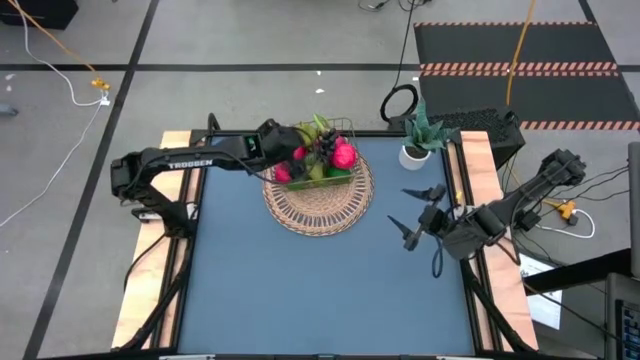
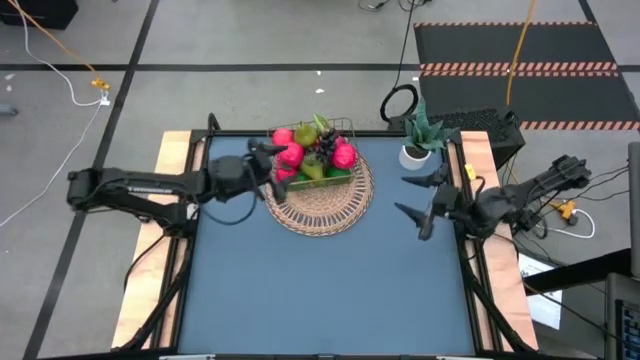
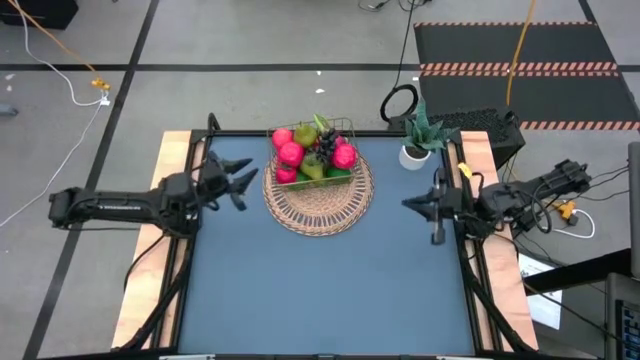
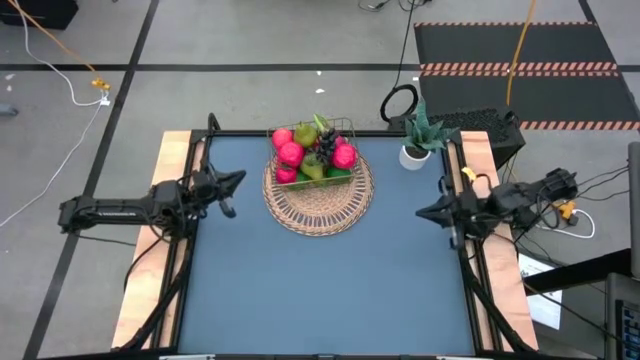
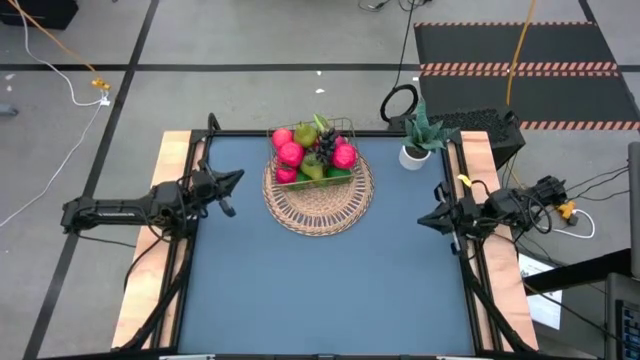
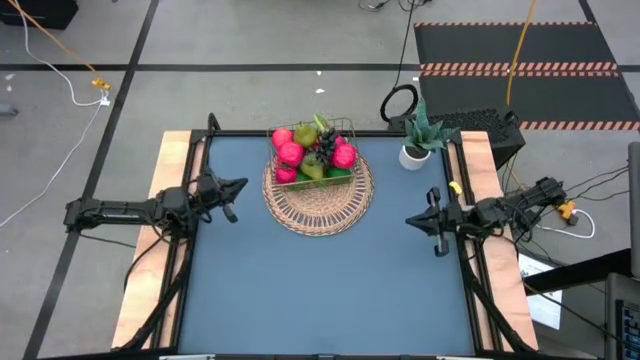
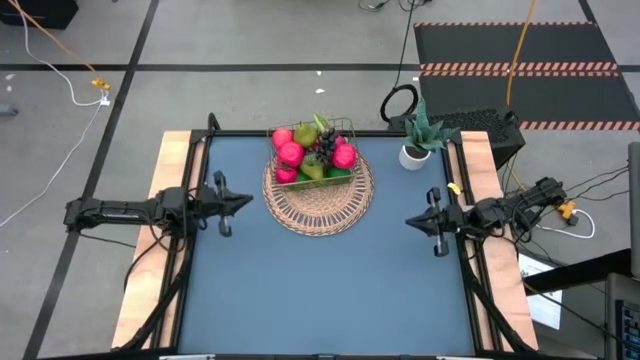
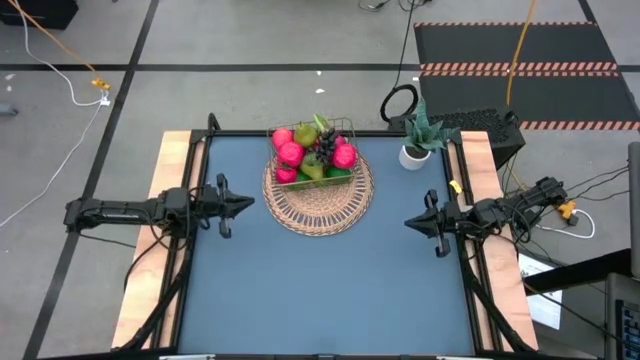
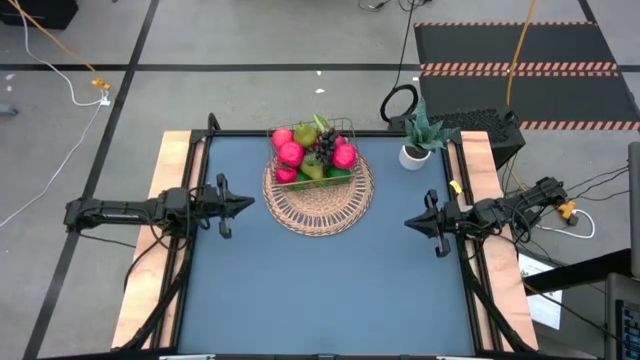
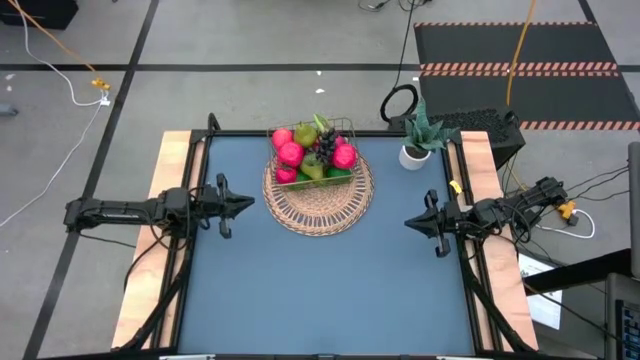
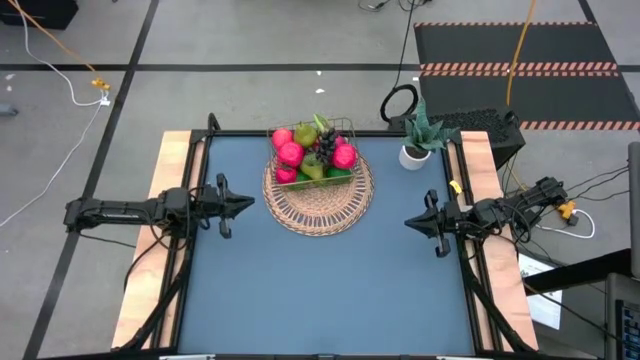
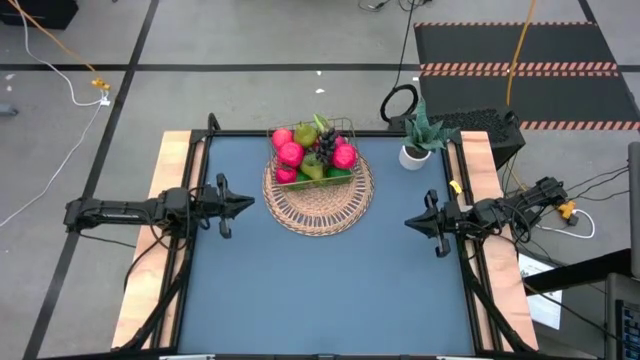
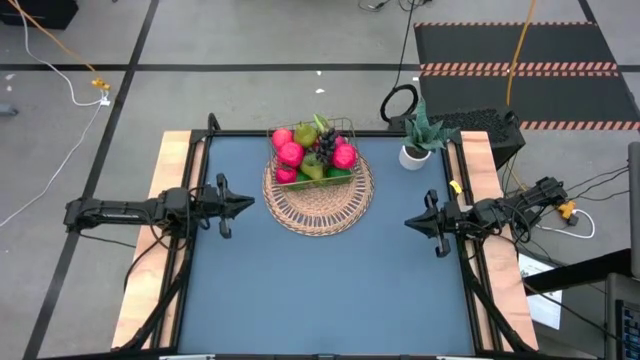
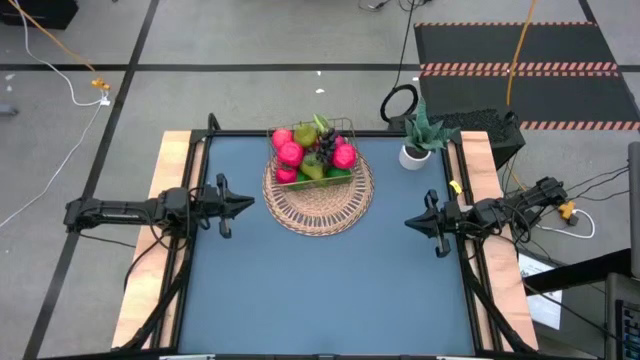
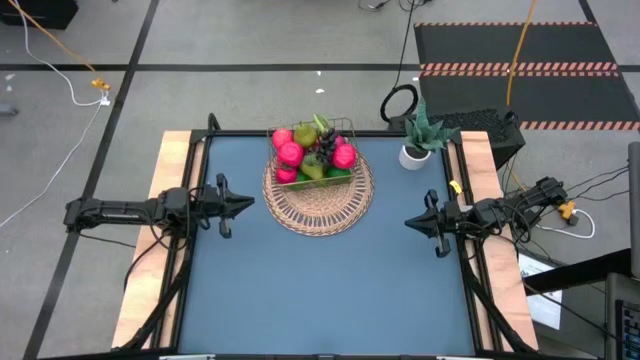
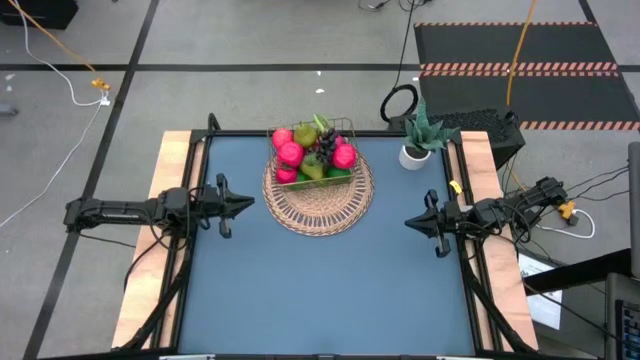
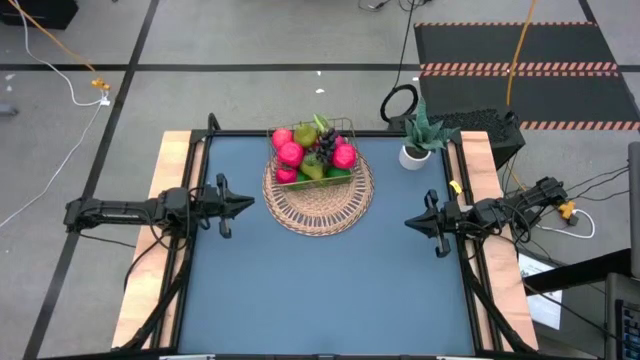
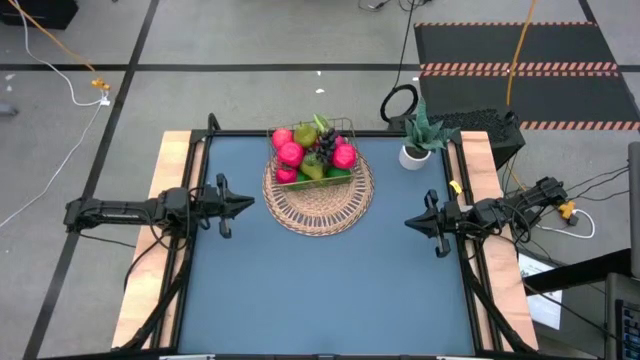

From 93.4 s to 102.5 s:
Task: Build produce basket
Return to Home Position

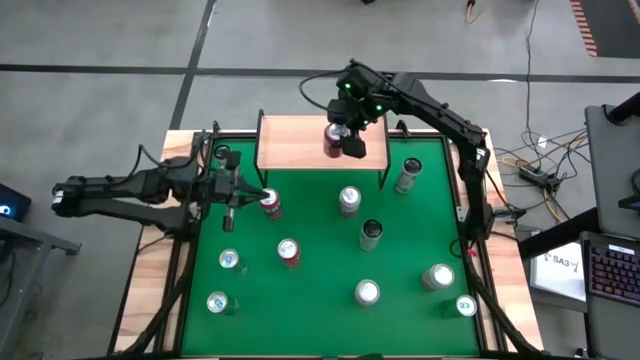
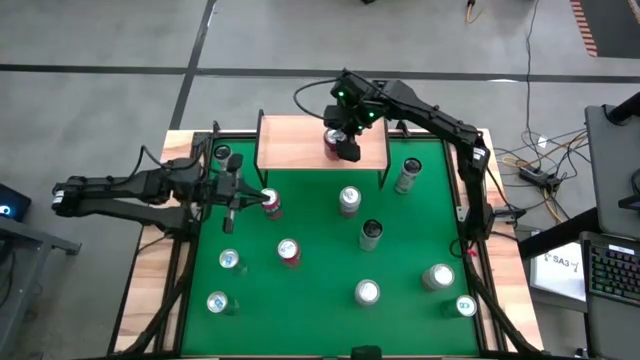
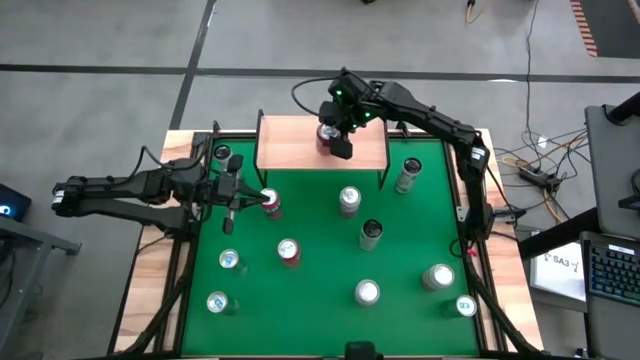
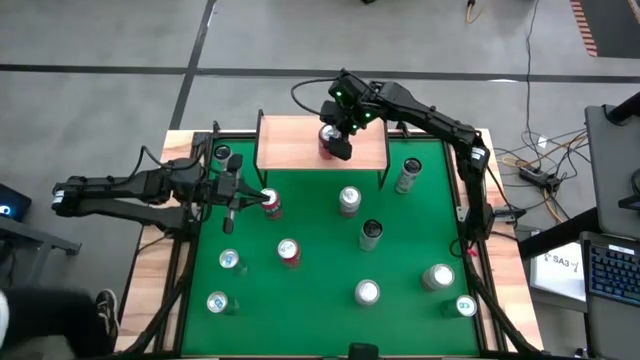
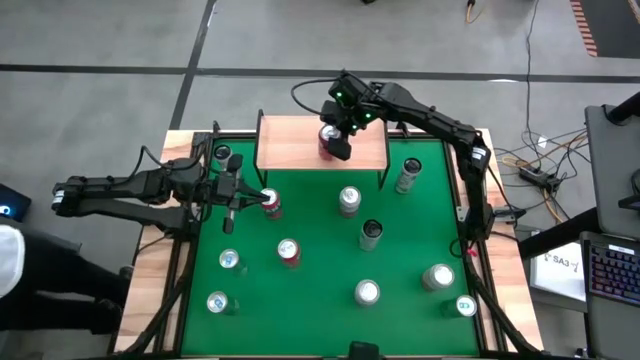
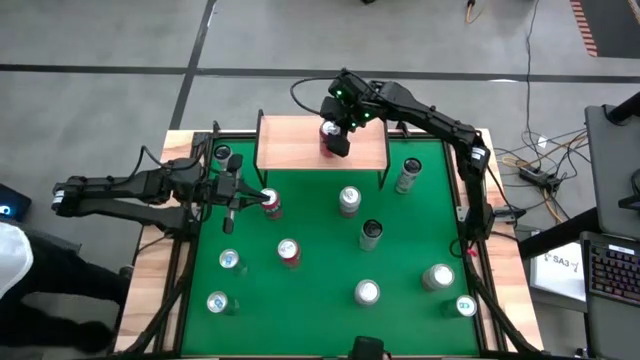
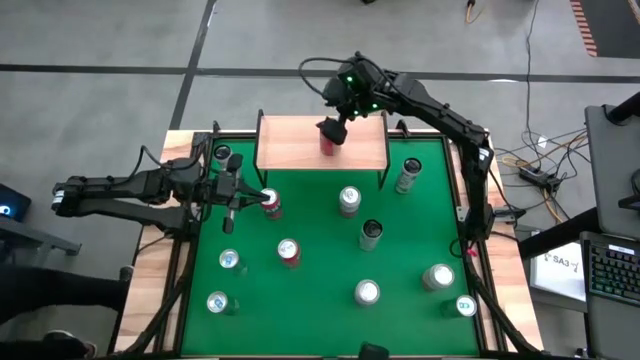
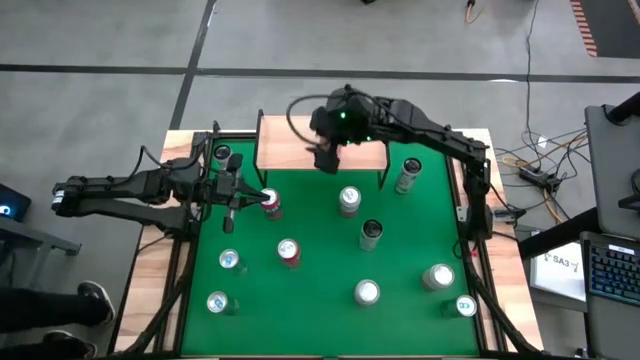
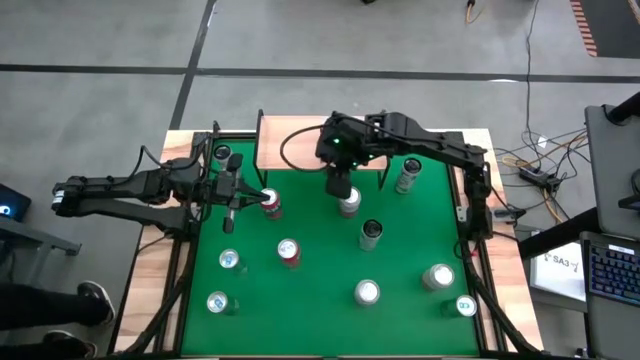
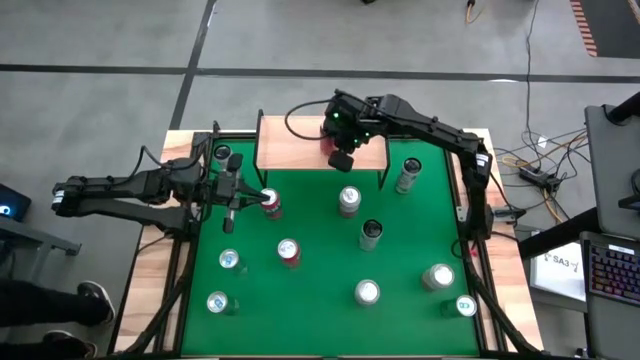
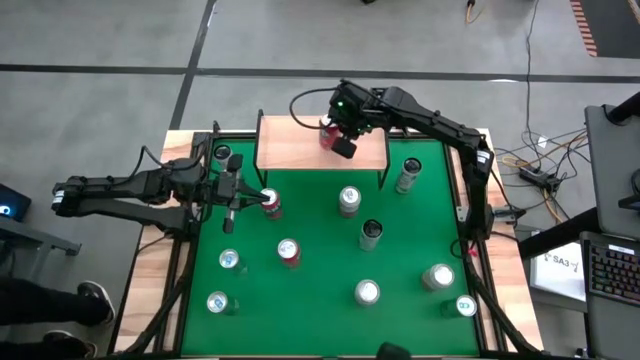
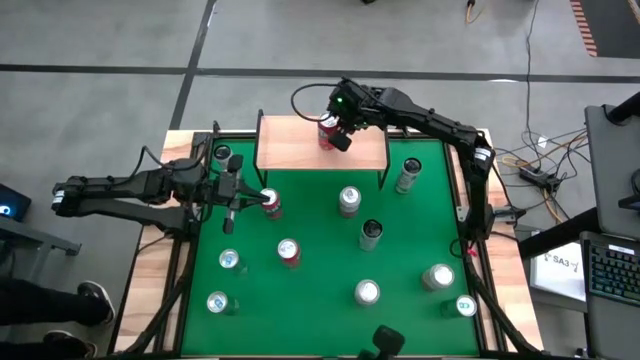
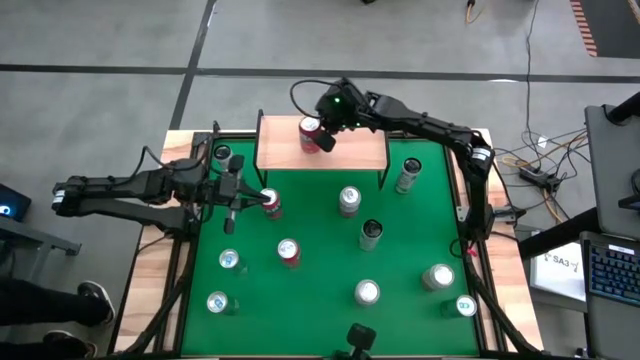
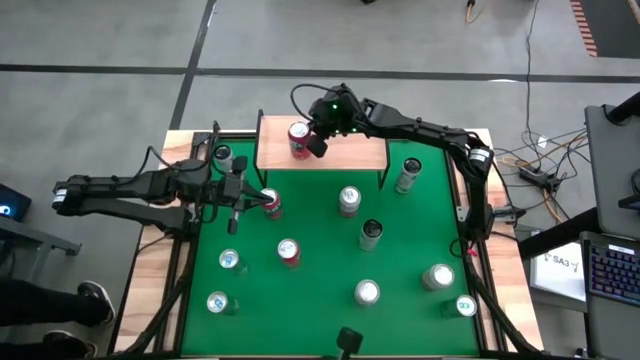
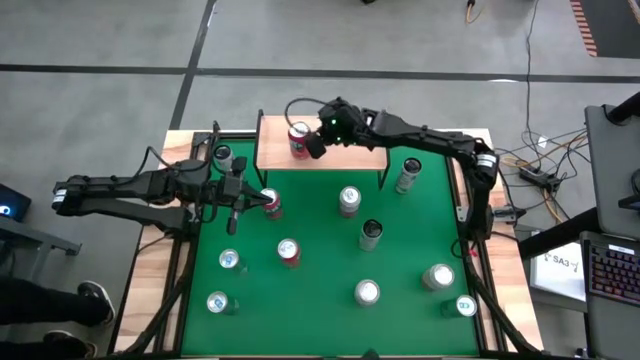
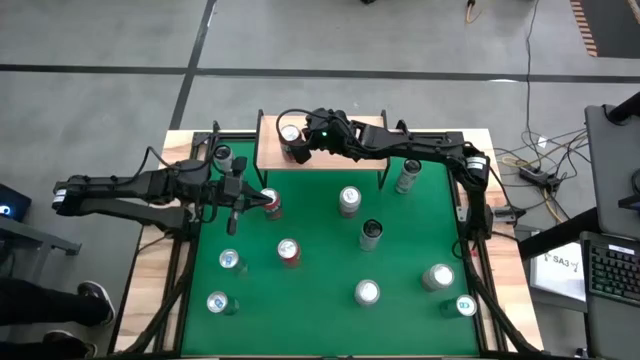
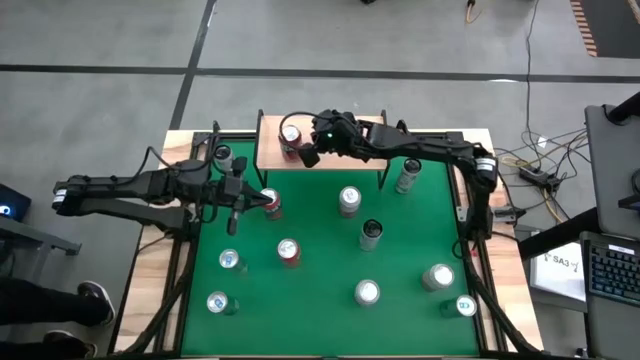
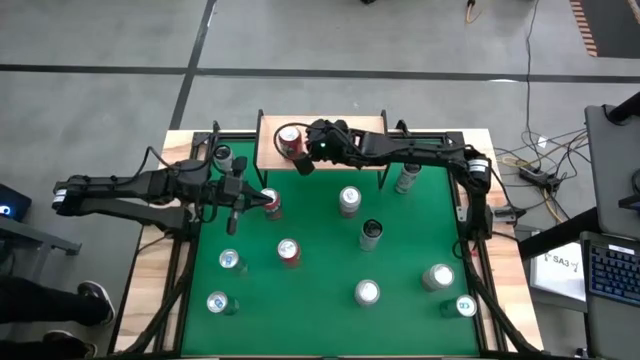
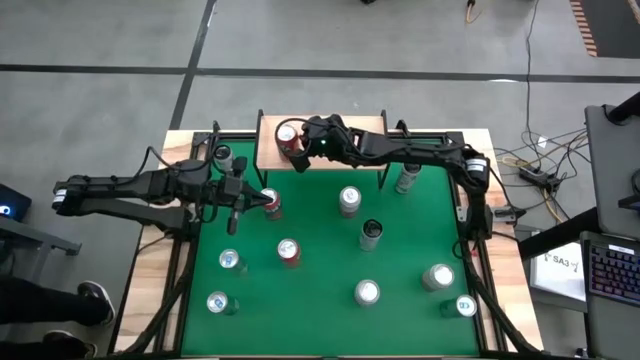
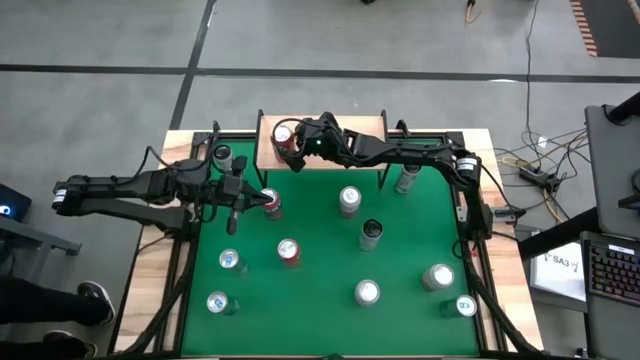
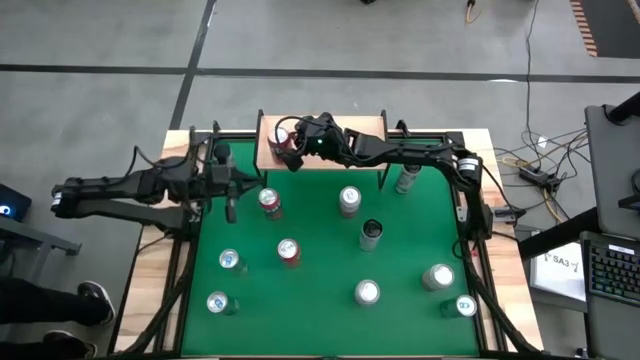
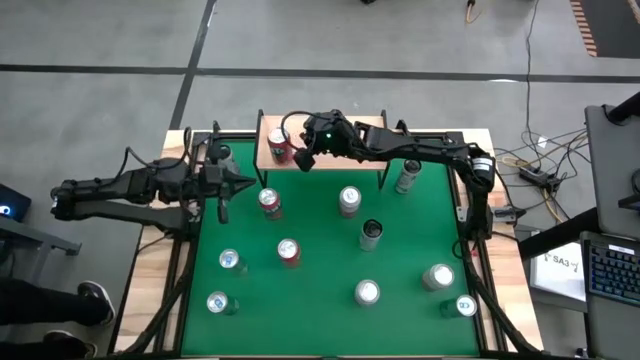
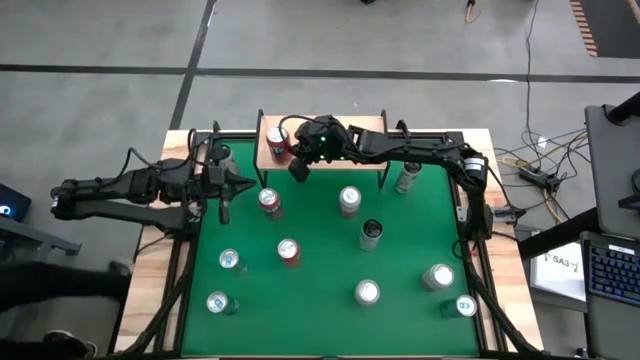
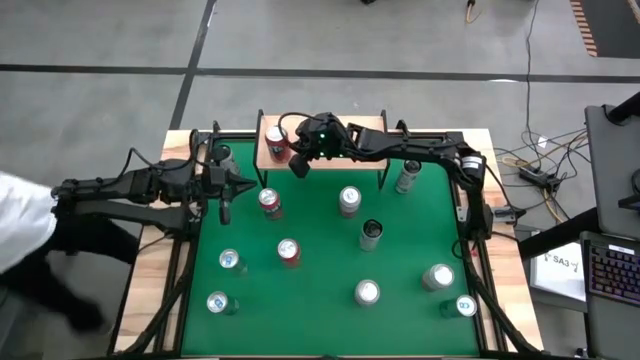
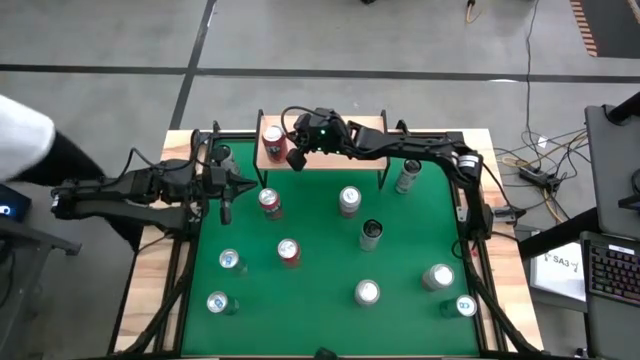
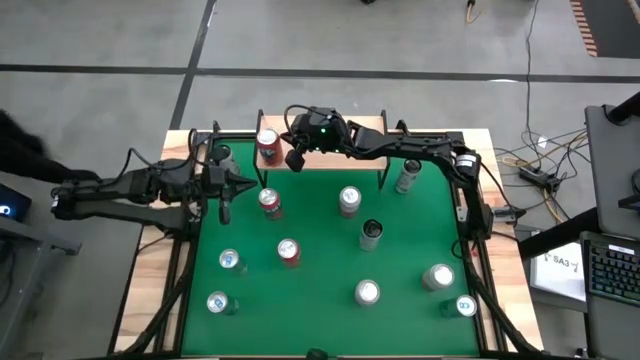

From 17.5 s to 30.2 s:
Task: Place canned beverage on shelf
Put the bottom orange soda can on the shelf
